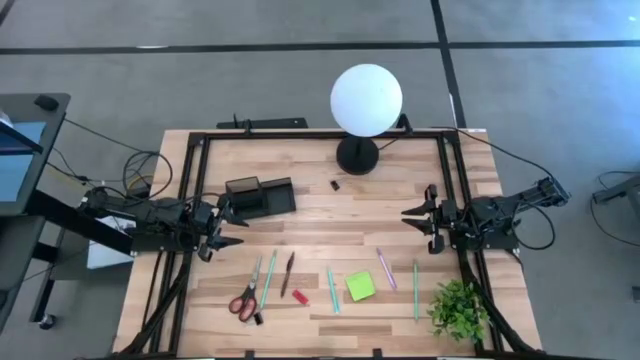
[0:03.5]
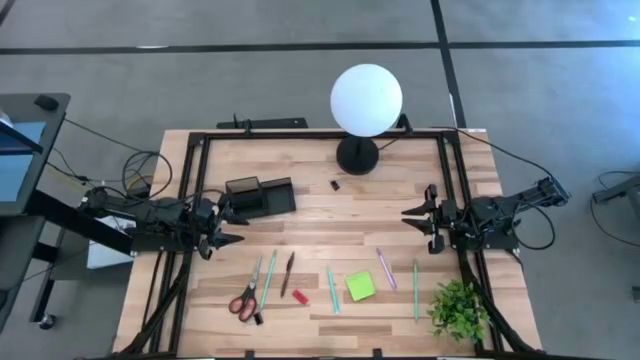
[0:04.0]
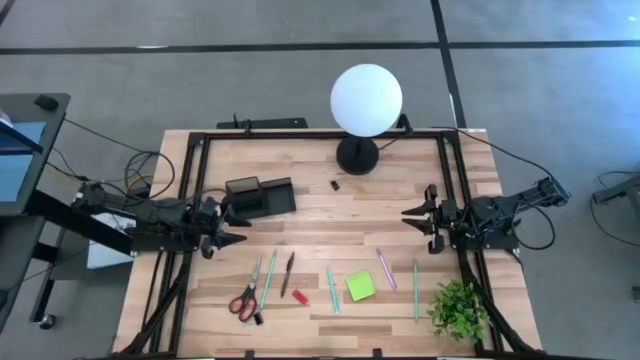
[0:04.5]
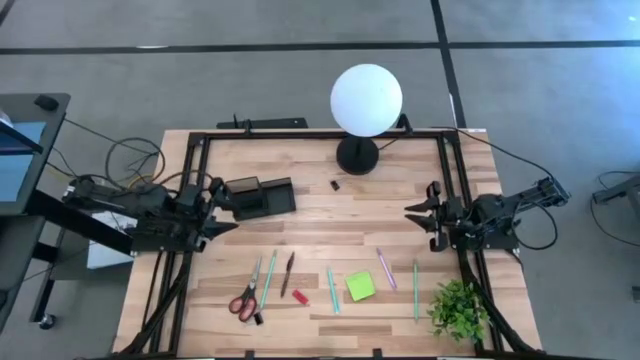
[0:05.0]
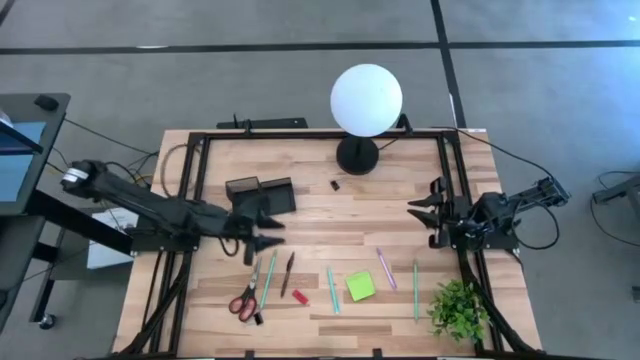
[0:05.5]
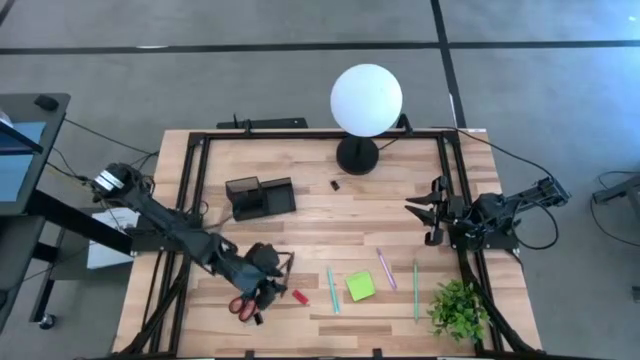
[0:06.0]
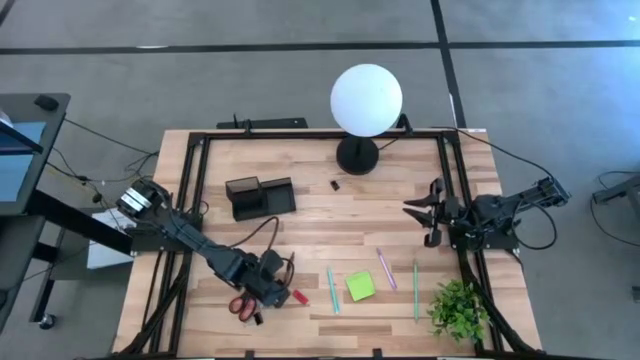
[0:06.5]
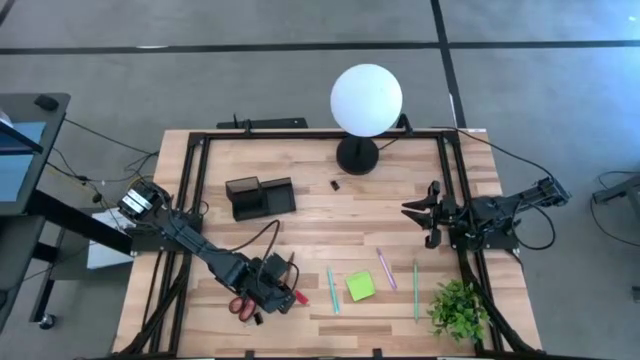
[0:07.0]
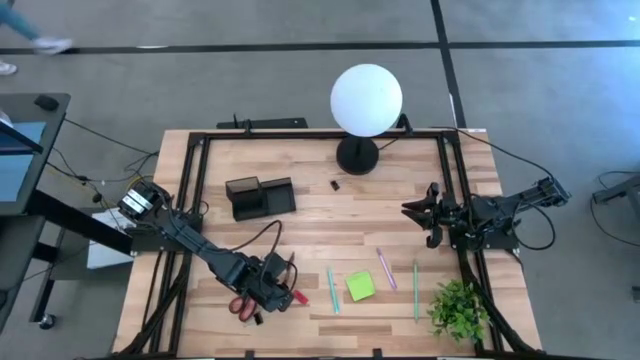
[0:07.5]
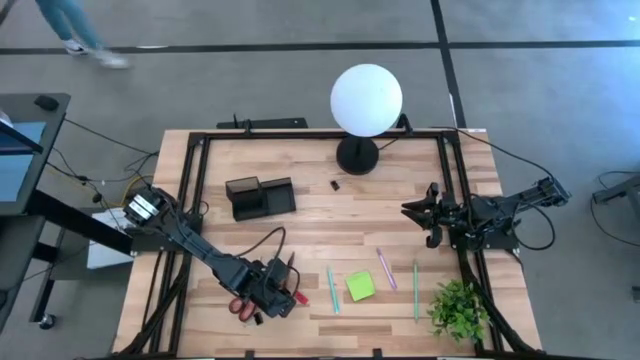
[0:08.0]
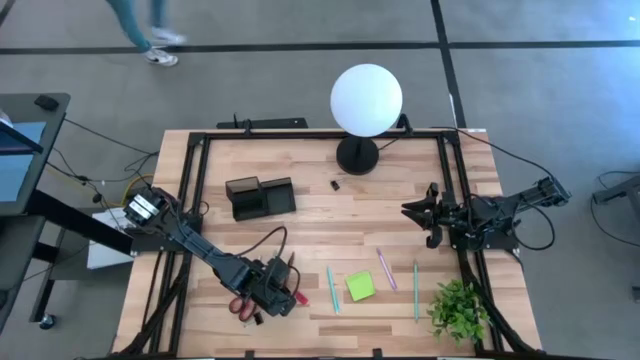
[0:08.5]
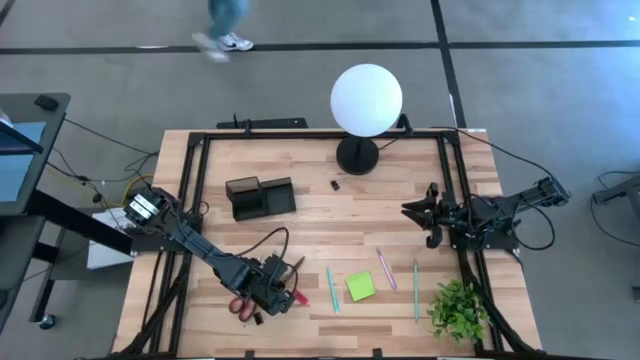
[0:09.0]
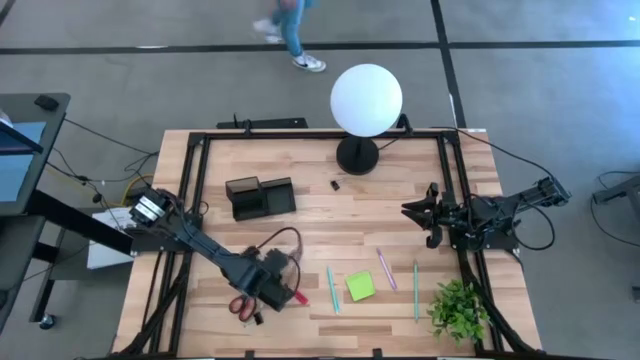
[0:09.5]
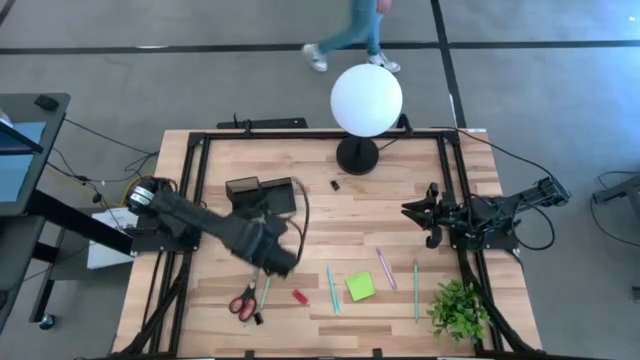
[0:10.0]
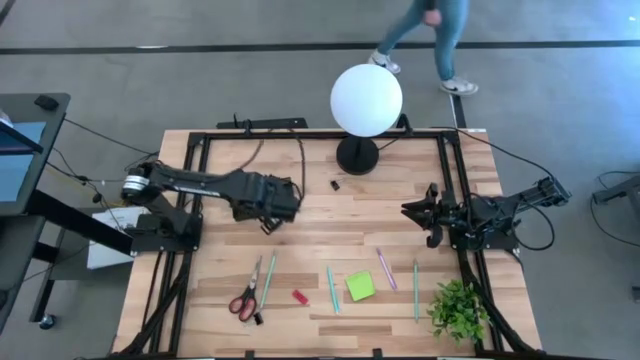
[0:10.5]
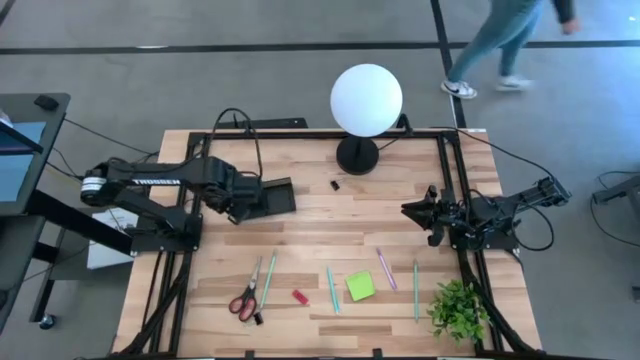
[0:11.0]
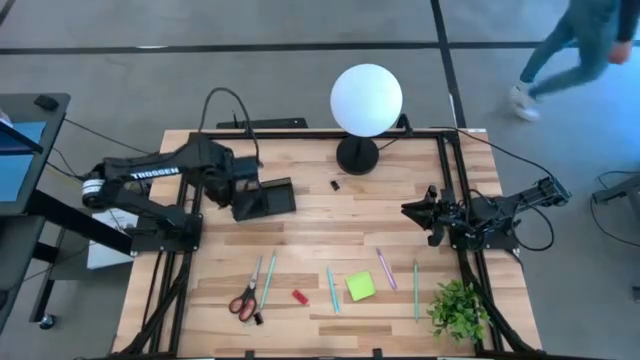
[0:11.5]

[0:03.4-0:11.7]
Task: Pick and place office supplies into organizer
Put the brown pen into the black desk organizer

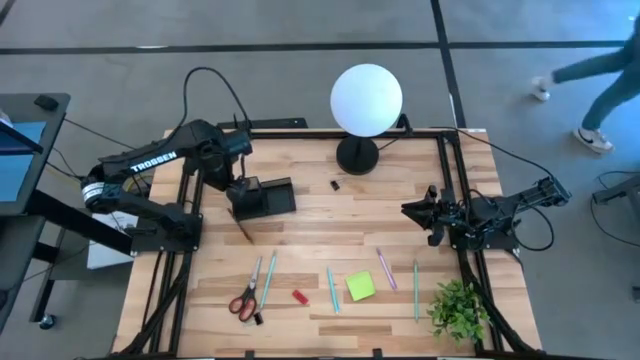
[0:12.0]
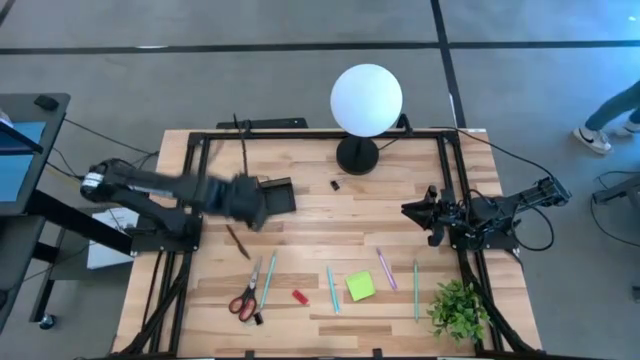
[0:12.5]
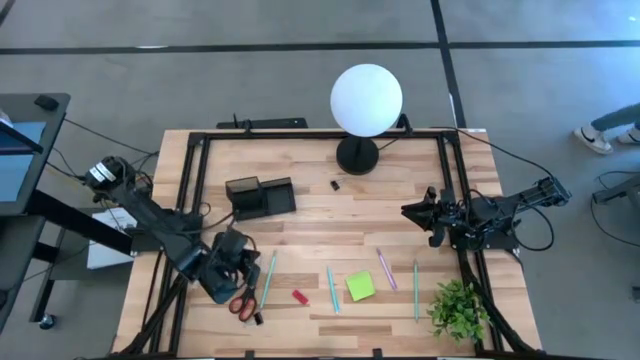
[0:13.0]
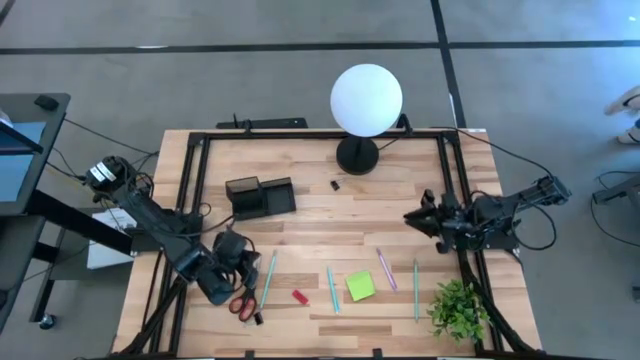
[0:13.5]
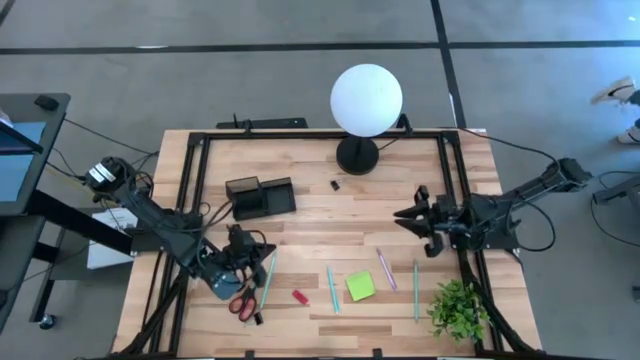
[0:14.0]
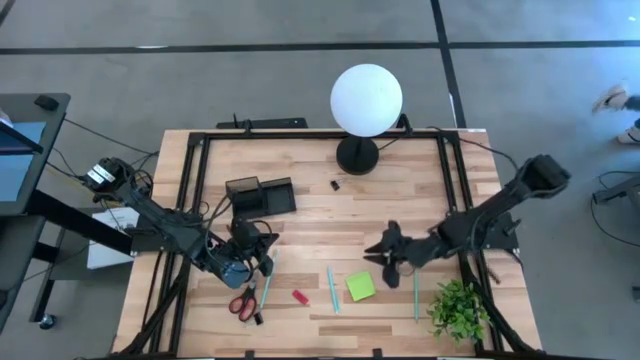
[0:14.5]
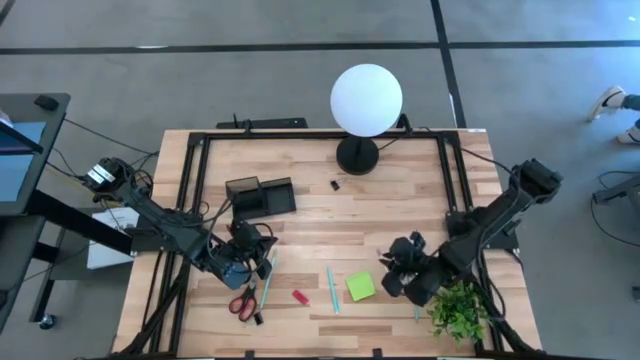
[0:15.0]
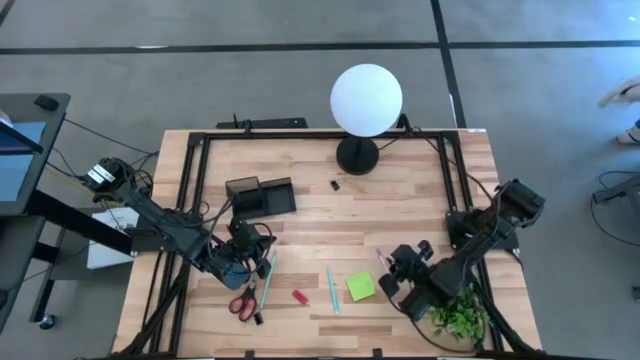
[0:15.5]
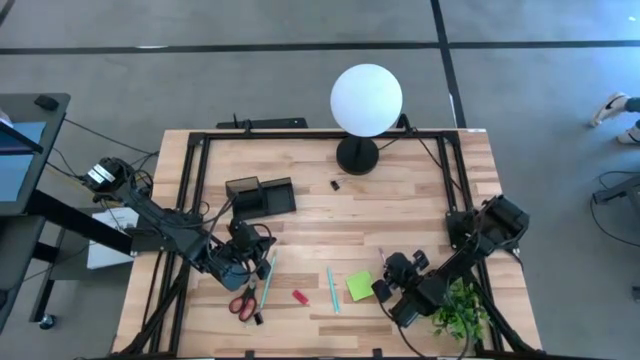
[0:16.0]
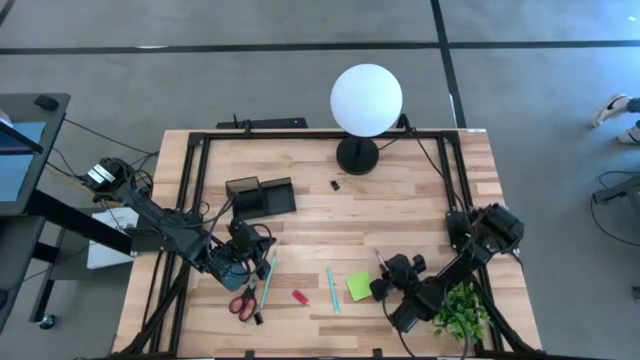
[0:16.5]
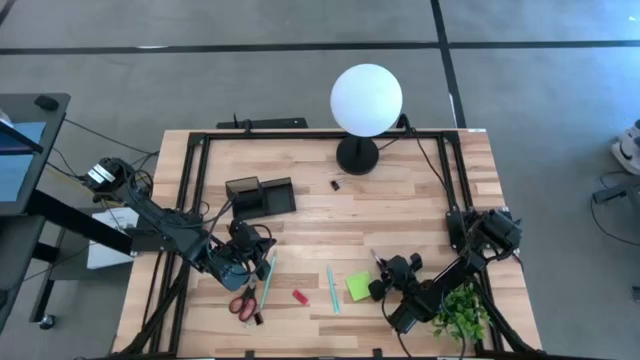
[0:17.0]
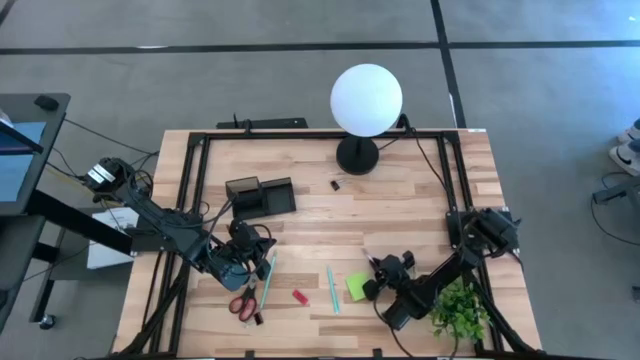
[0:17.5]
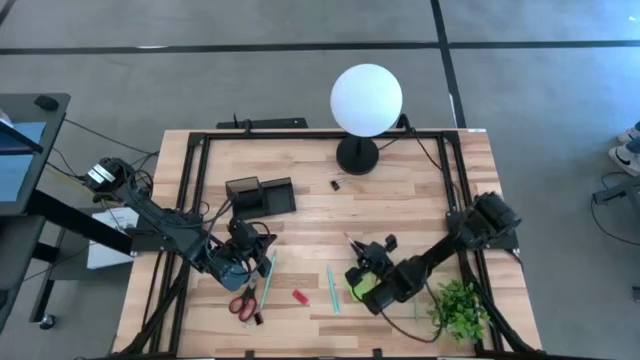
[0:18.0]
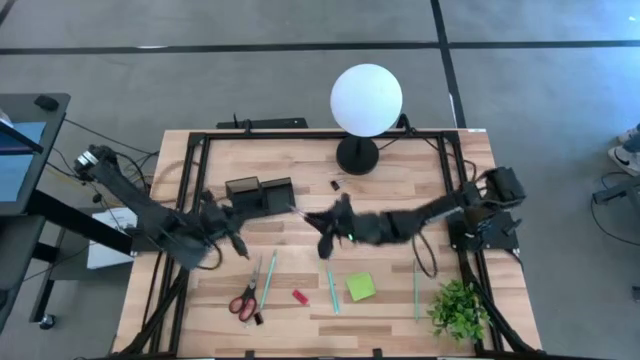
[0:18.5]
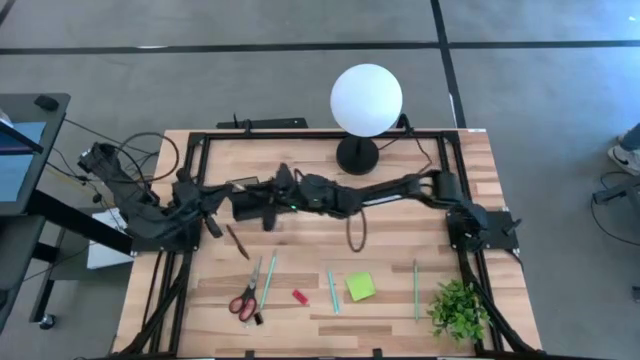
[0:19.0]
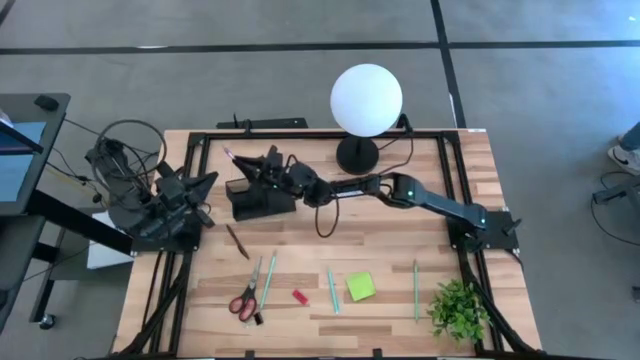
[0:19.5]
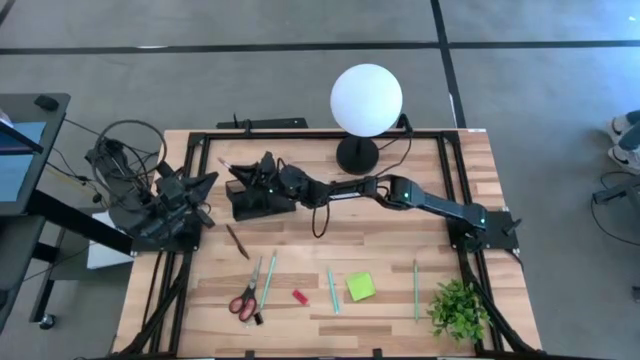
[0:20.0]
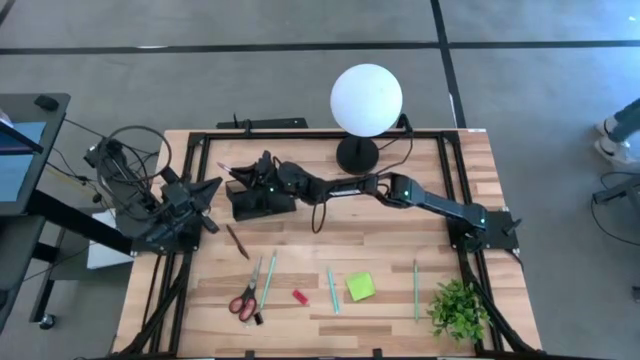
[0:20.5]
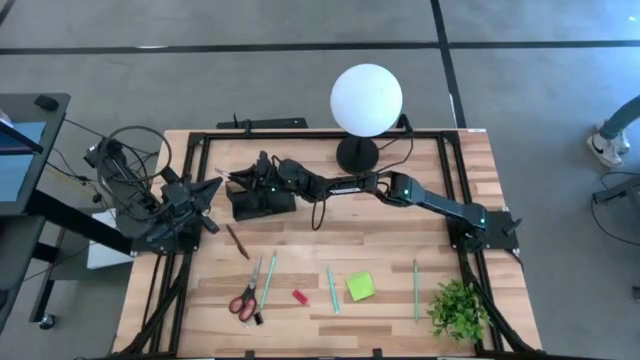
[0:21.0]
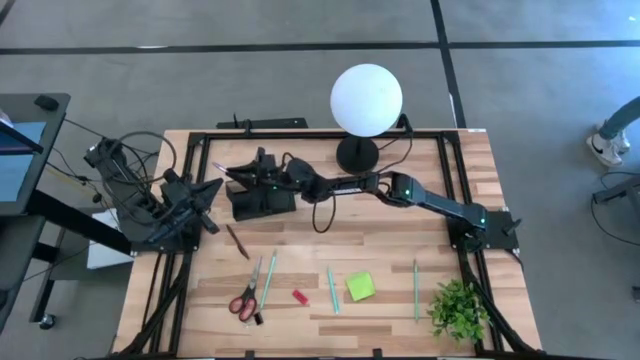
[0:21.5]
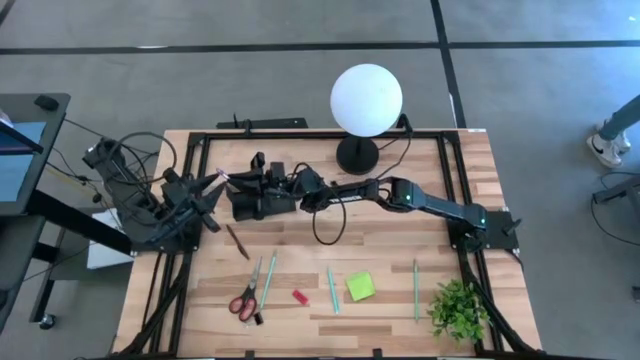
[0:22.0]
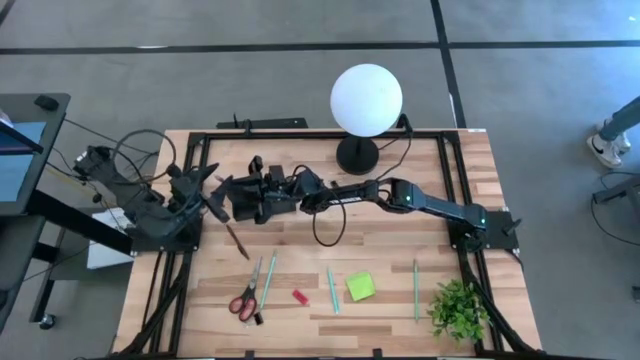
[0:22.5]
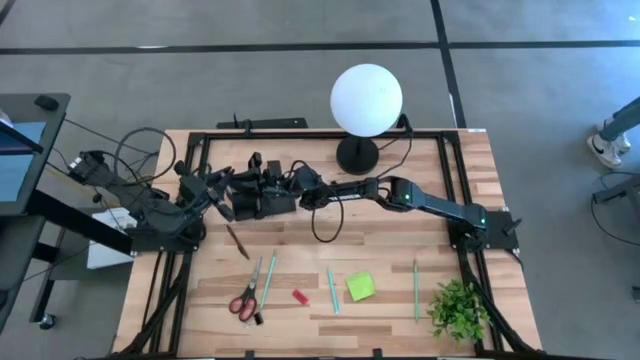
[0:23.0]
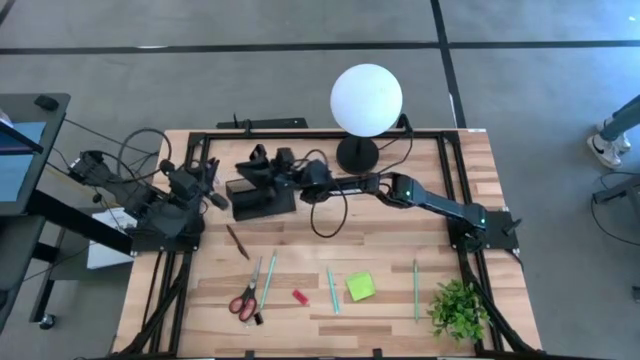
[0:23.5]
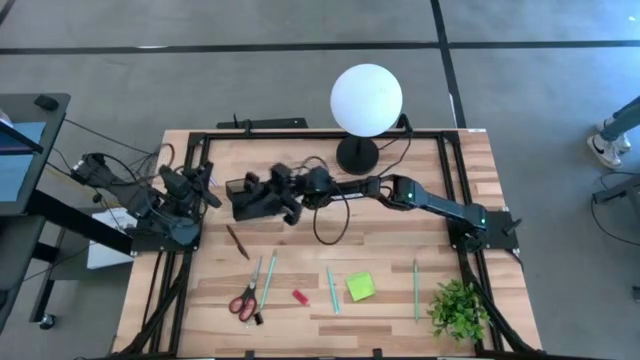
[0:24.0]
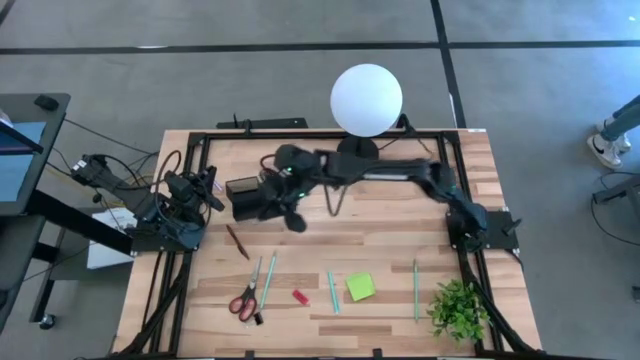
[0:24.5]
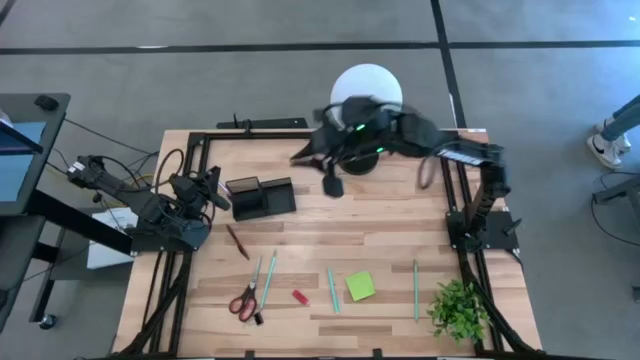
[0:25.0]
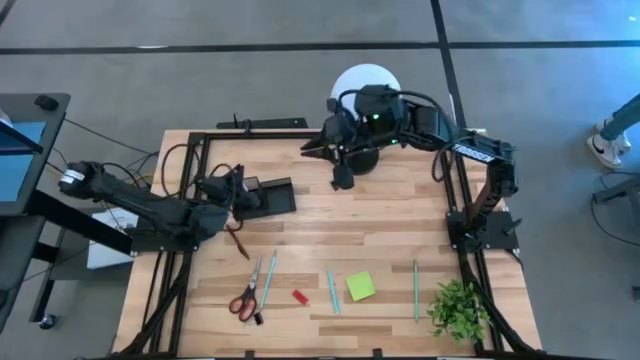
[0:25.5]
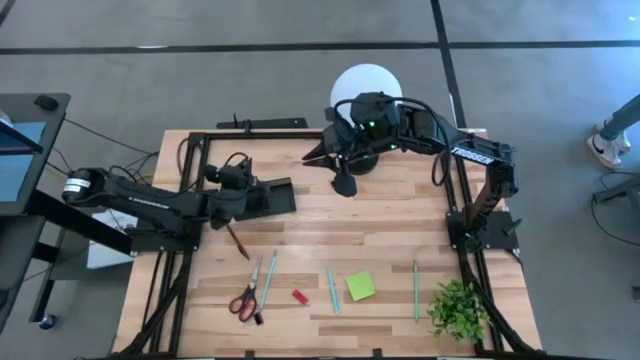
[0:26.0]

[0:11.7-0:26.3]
Put the purple pen into the black desk organizer
